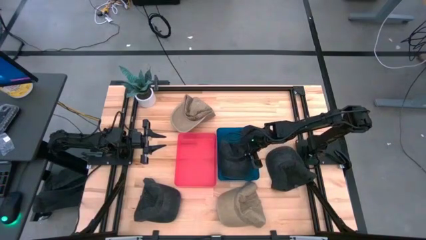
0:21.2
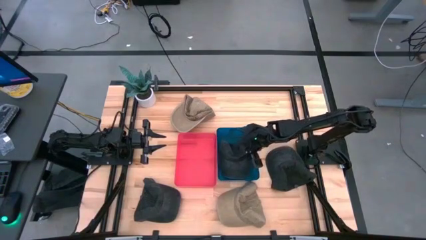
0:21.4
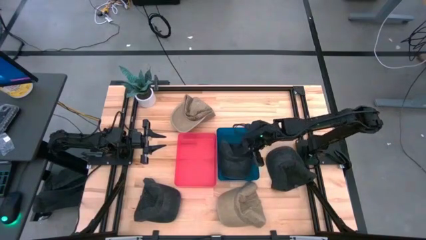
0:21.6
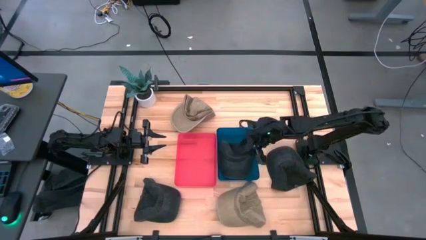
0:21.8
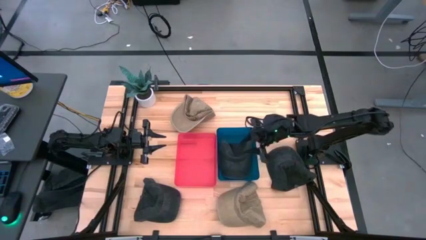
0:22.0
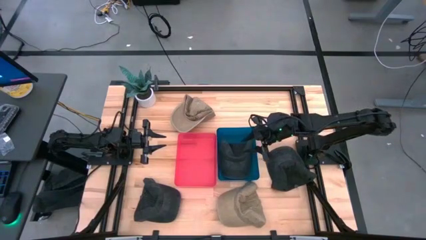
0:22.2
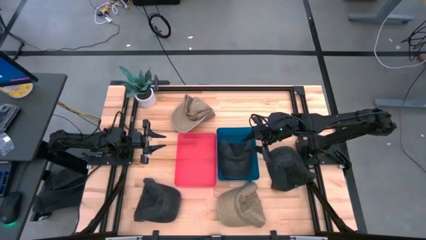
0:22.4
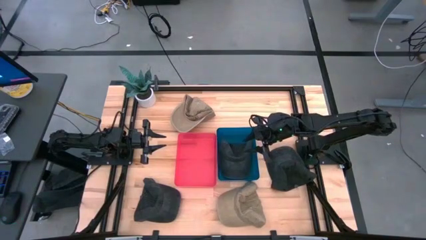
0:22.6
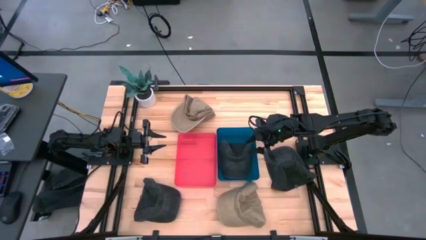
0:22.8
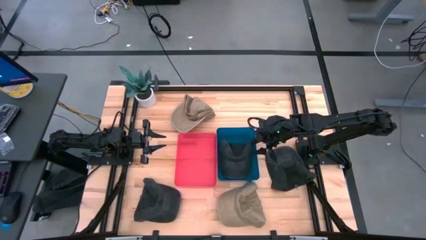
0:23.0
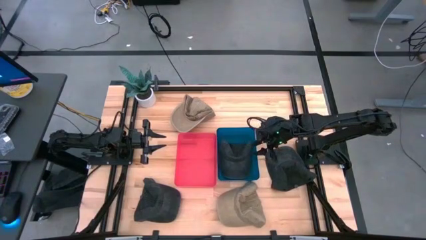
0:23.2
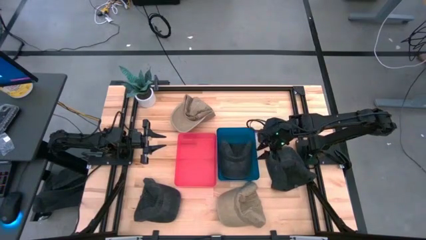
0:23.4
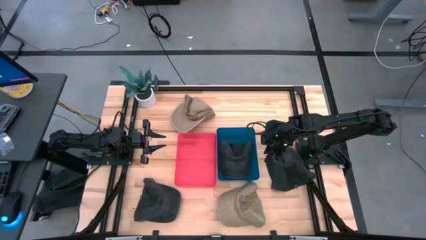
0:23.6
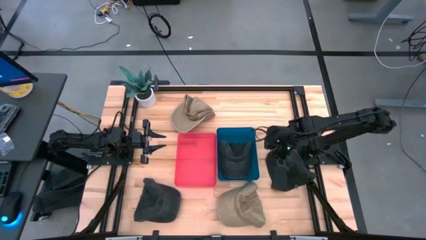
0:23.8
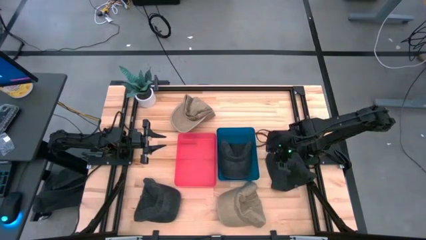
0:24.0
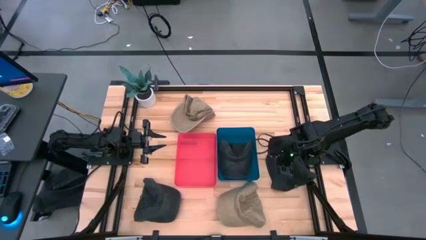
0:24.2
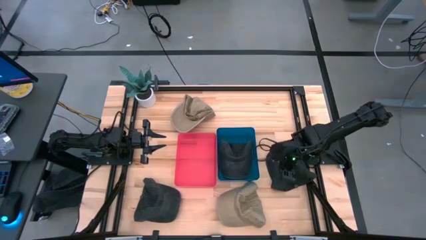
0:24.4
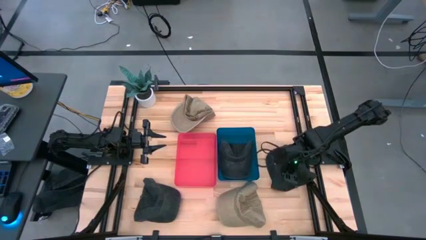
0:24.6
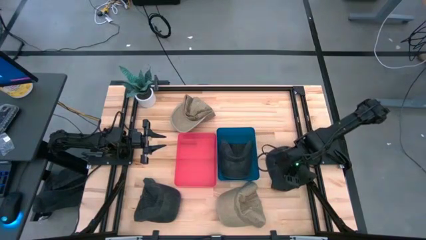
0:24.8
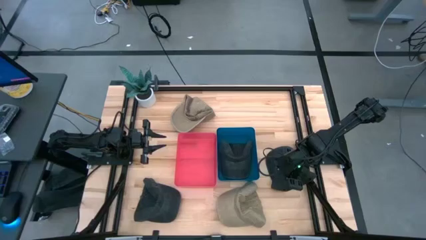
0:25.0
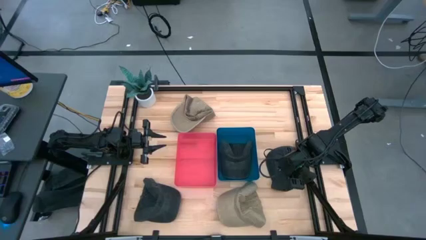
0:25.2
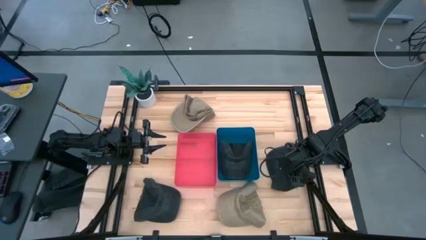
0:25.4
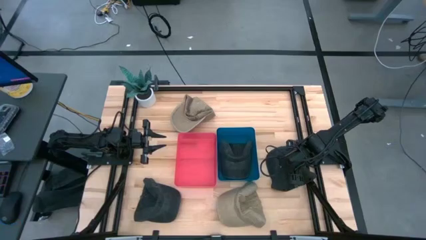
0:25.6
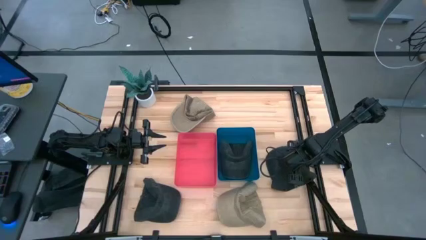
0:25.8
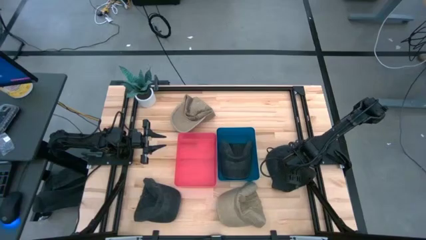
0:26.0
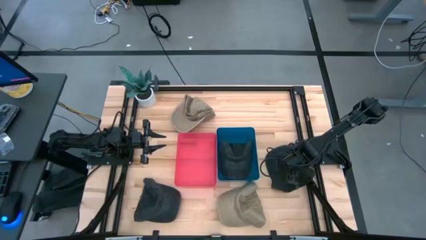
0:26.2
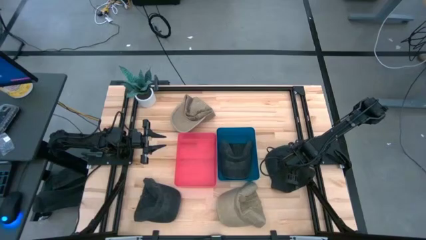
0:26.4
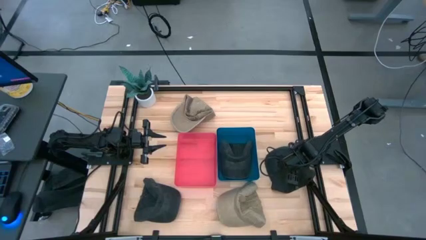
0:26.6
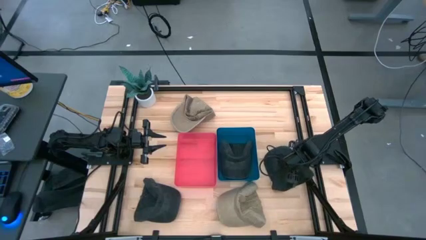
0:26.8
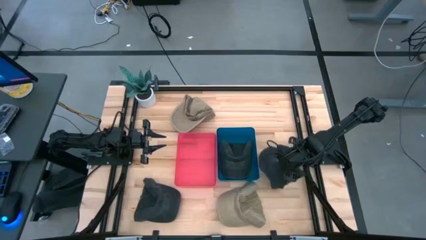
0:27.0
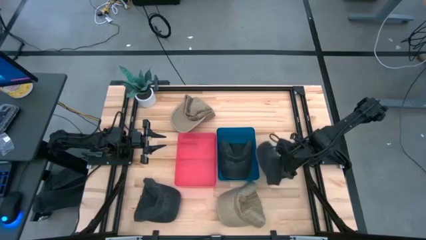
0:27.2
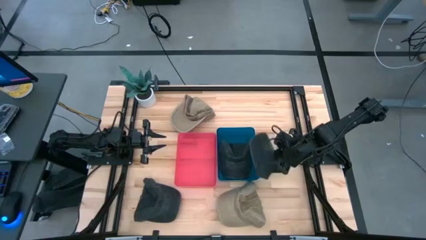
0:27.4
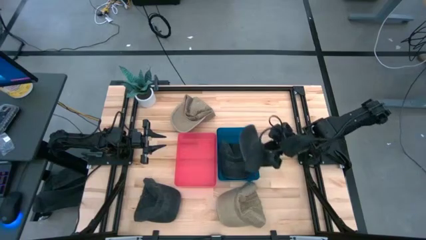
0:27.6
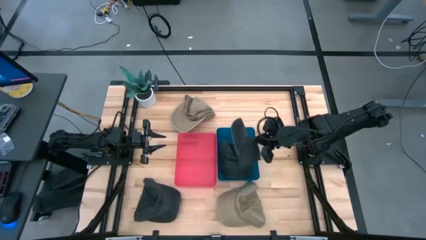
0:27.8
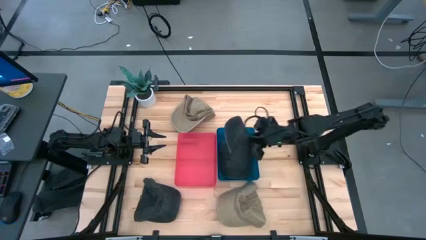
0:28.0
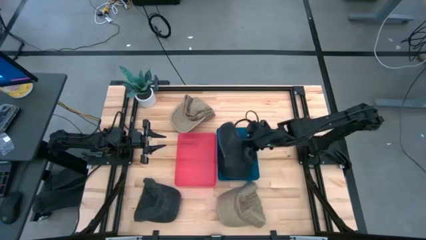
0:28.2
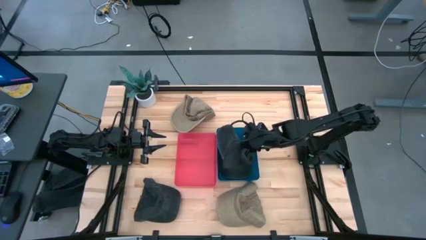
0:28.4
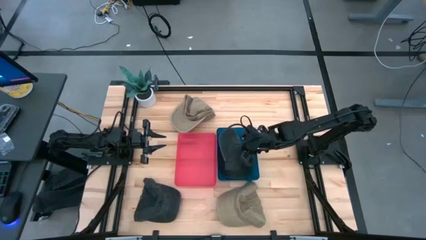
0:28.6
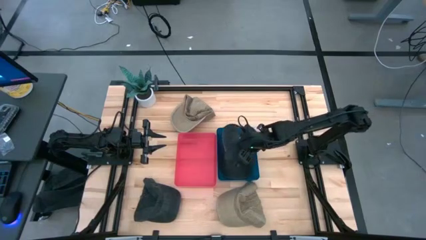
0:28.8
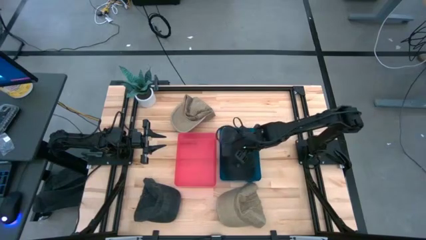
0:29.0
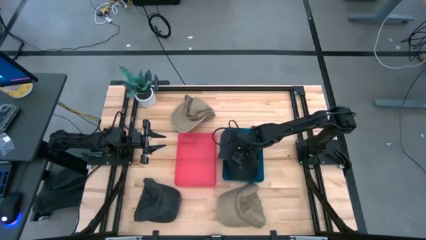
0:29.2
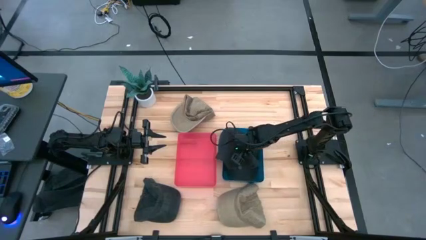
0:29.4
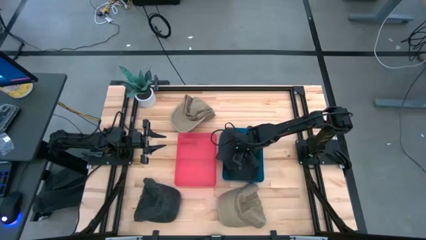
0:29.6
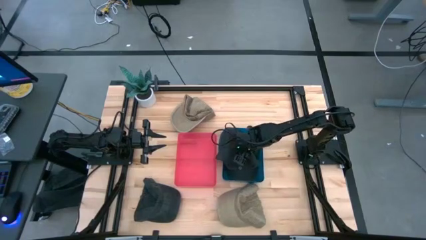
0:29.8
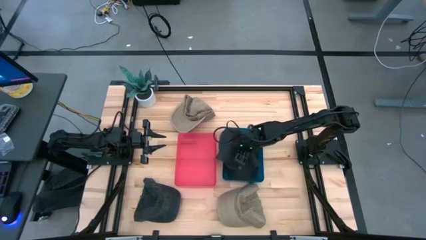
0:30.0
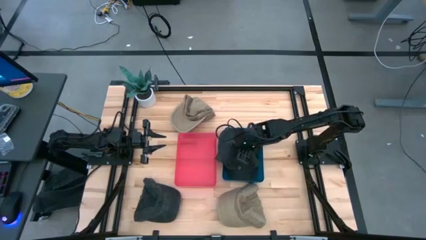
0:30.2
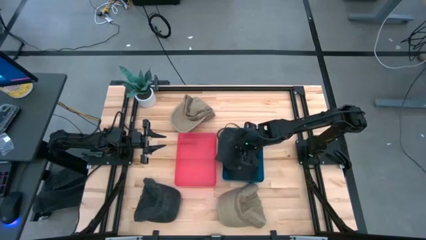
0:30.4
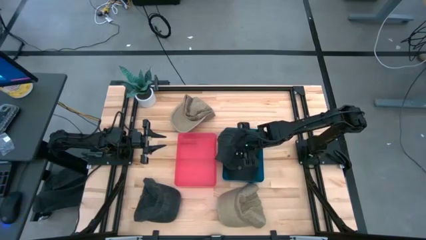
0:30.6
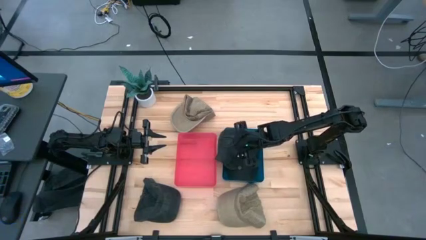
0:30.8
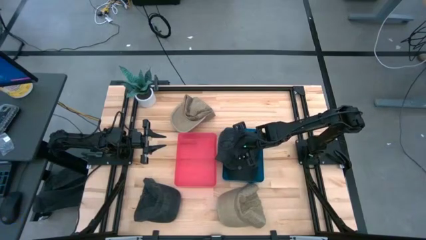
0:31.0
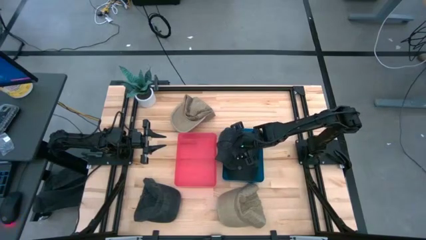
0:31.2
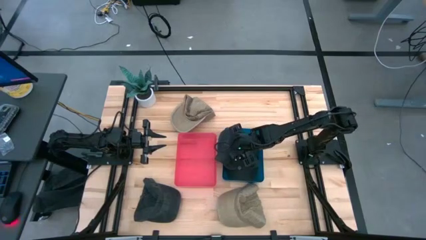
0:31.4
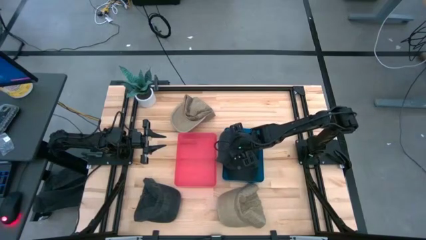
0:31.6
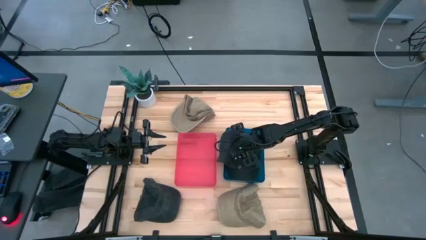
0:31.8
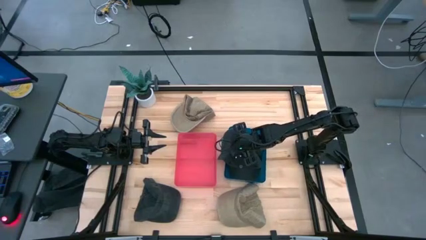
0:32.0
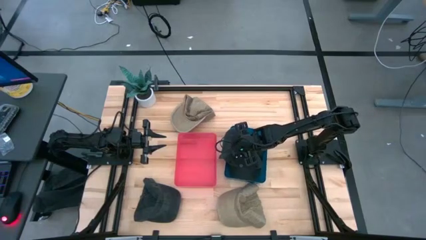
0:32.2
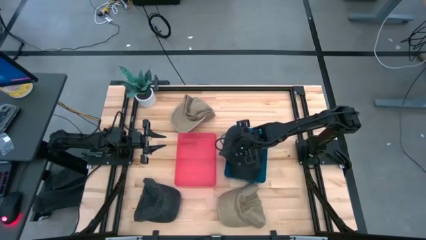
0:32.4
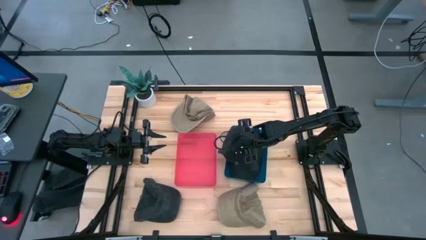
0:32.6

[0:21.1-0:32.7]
Task: Pick & Place hat
Put the top black cap into the blue bin
